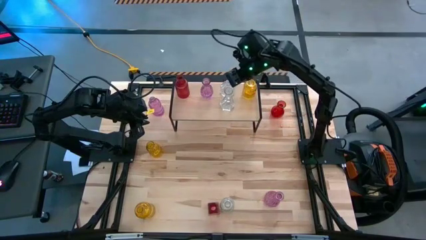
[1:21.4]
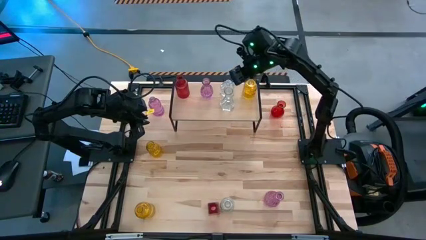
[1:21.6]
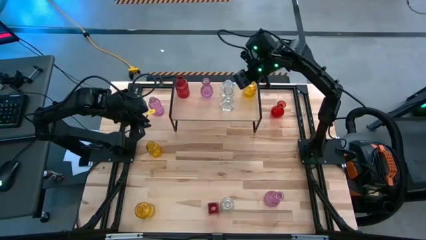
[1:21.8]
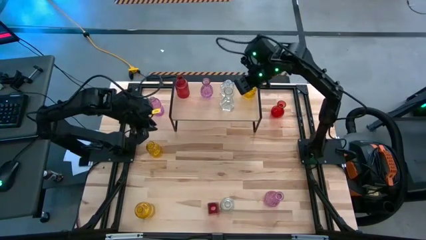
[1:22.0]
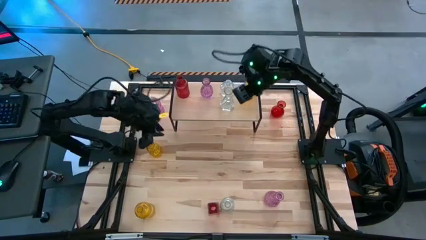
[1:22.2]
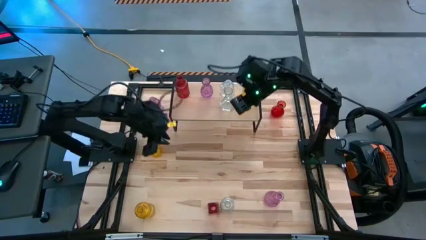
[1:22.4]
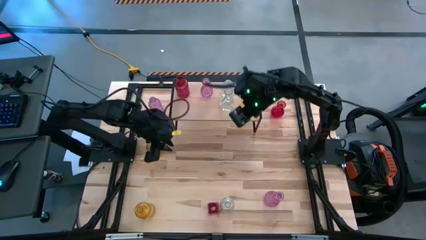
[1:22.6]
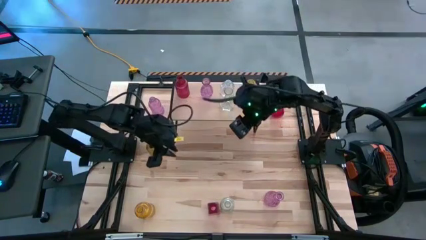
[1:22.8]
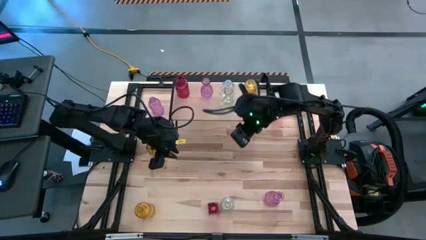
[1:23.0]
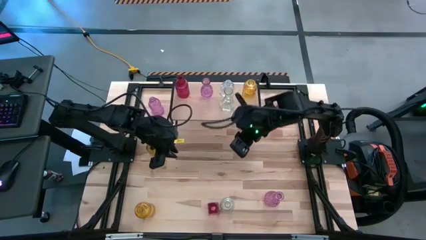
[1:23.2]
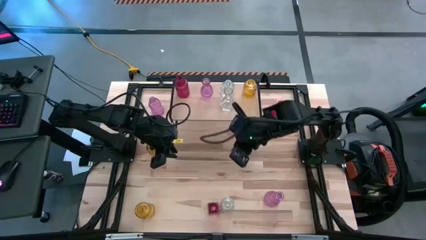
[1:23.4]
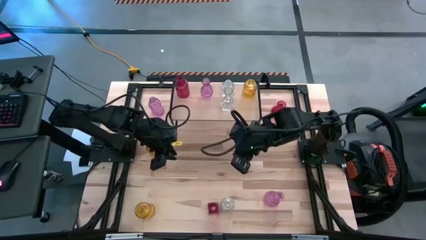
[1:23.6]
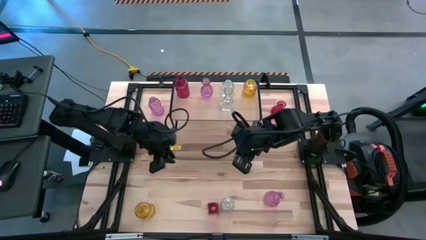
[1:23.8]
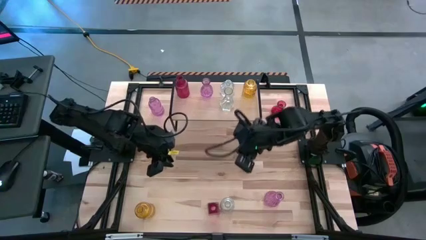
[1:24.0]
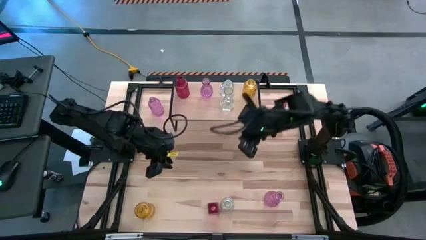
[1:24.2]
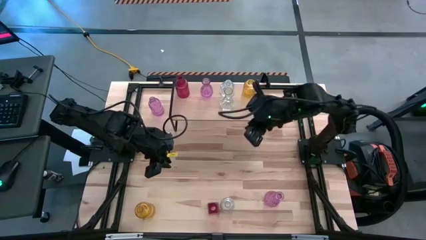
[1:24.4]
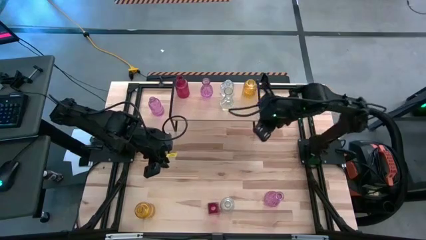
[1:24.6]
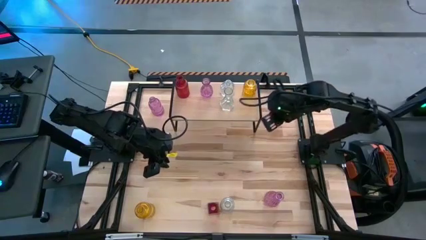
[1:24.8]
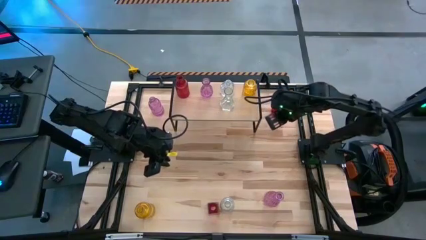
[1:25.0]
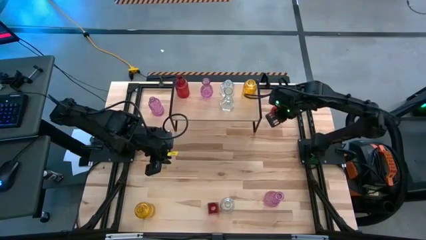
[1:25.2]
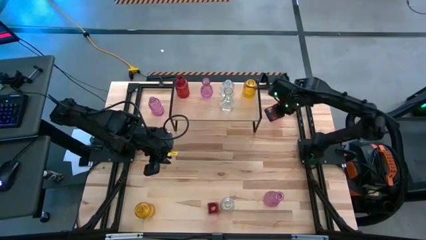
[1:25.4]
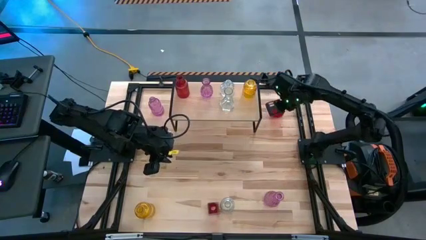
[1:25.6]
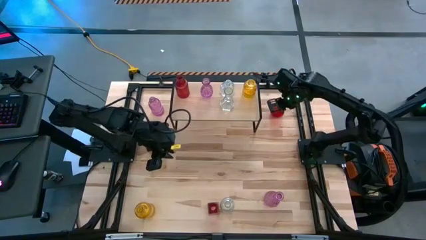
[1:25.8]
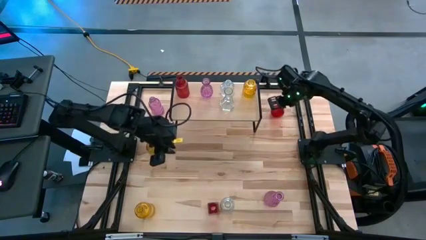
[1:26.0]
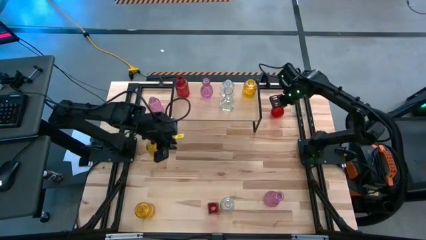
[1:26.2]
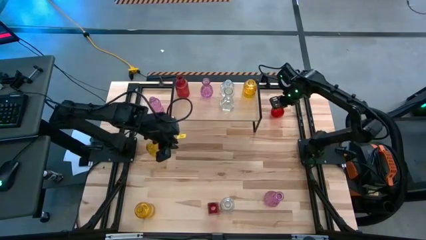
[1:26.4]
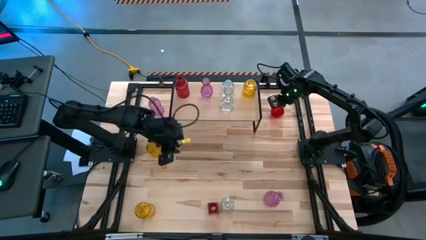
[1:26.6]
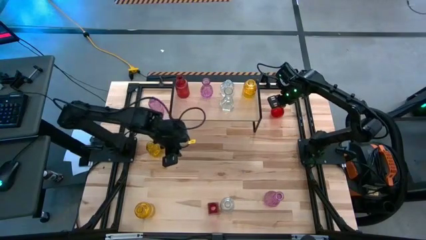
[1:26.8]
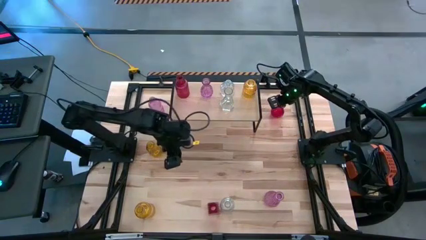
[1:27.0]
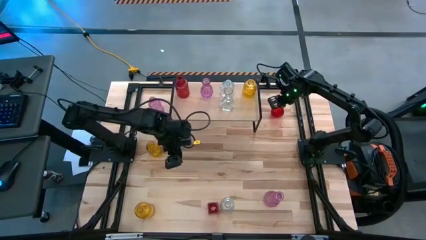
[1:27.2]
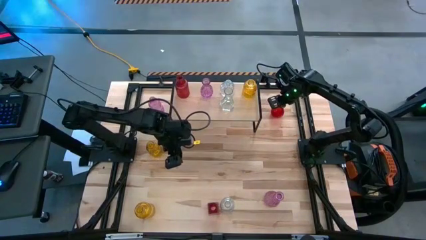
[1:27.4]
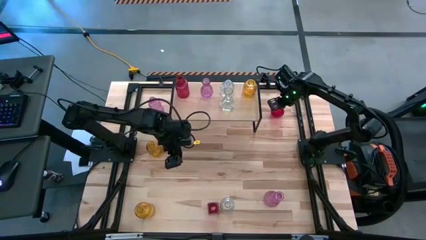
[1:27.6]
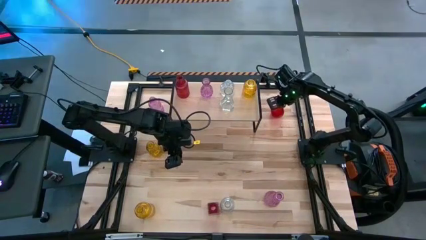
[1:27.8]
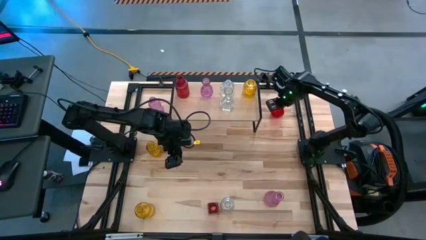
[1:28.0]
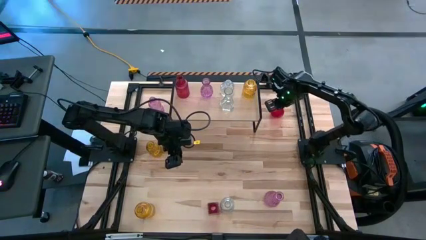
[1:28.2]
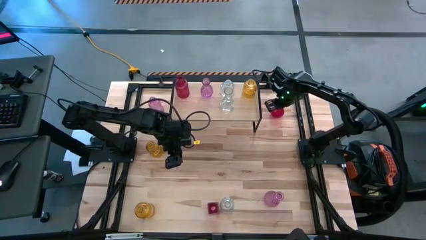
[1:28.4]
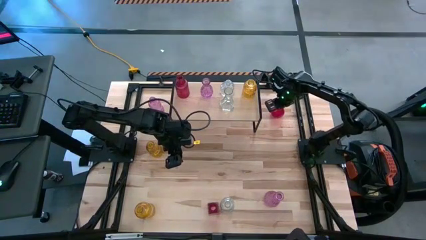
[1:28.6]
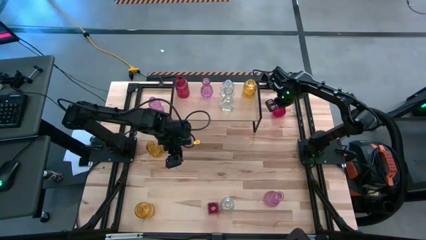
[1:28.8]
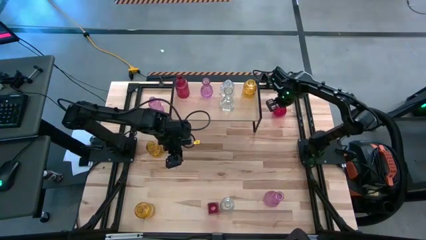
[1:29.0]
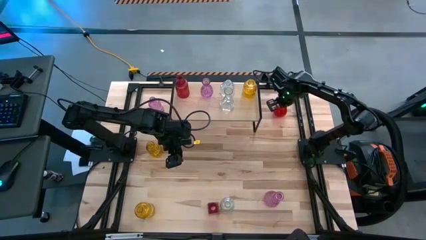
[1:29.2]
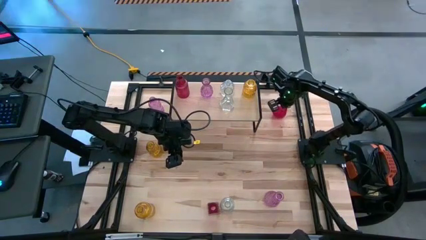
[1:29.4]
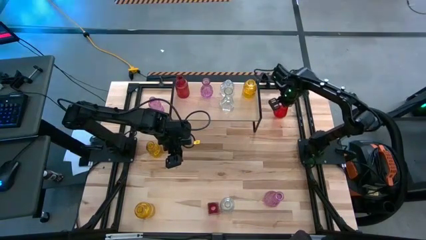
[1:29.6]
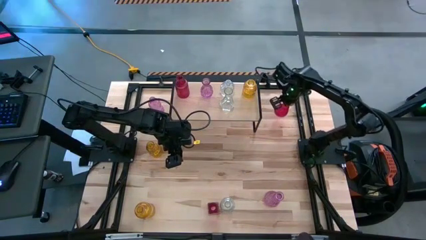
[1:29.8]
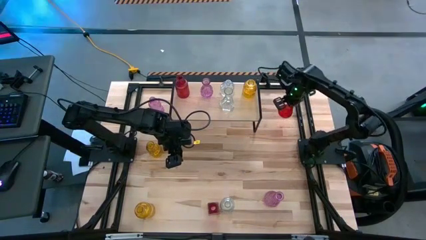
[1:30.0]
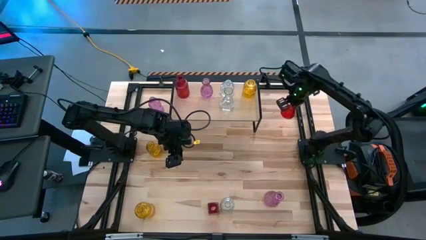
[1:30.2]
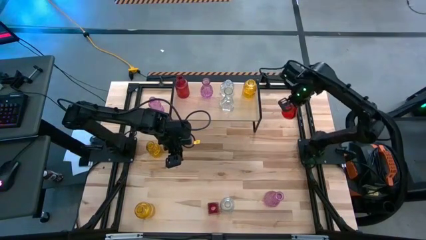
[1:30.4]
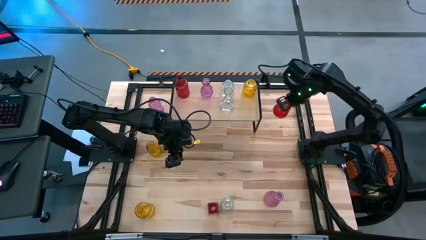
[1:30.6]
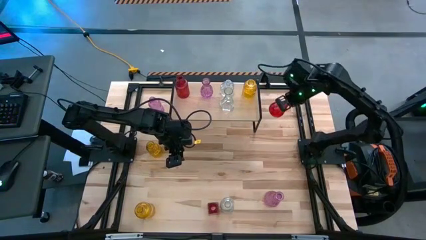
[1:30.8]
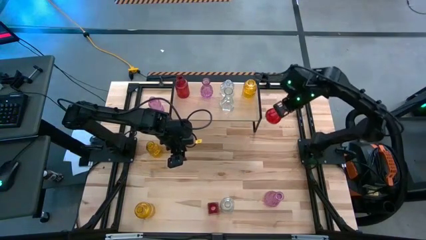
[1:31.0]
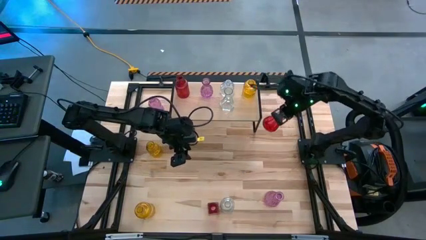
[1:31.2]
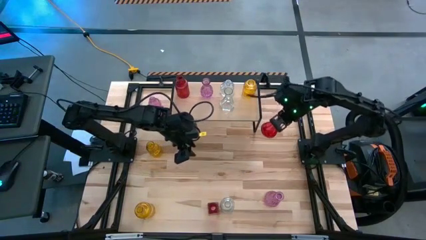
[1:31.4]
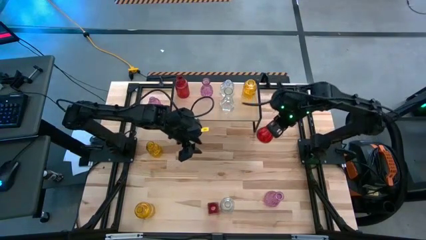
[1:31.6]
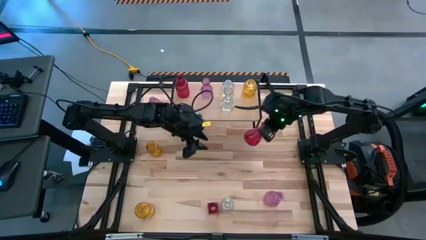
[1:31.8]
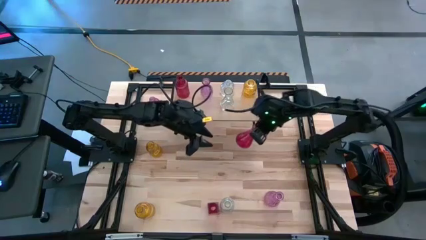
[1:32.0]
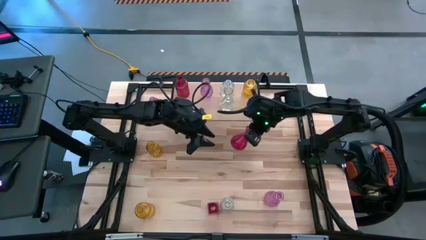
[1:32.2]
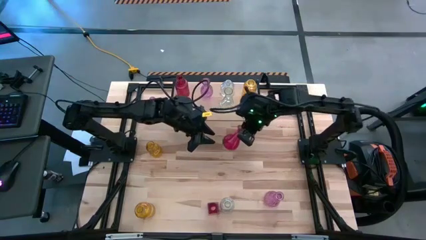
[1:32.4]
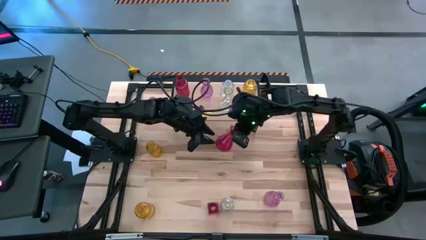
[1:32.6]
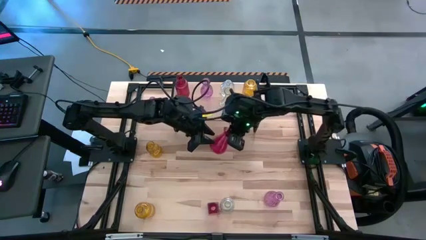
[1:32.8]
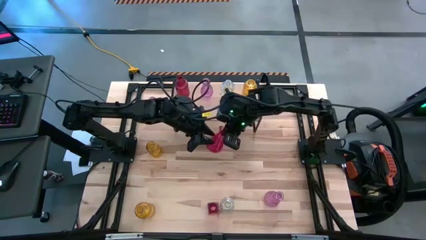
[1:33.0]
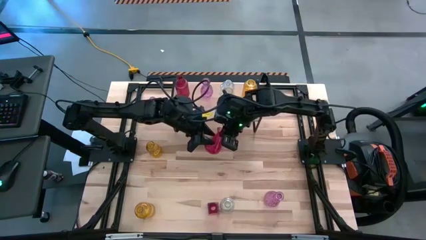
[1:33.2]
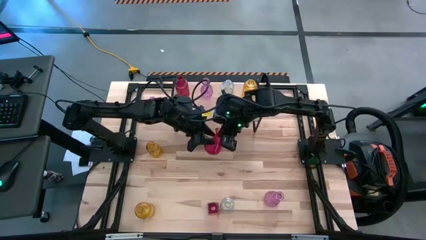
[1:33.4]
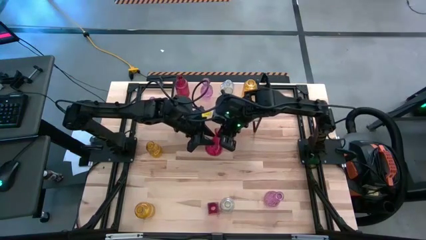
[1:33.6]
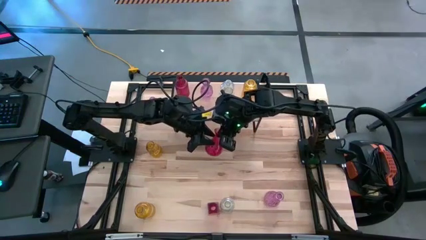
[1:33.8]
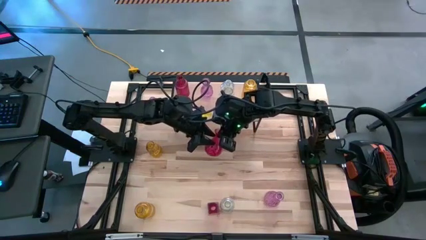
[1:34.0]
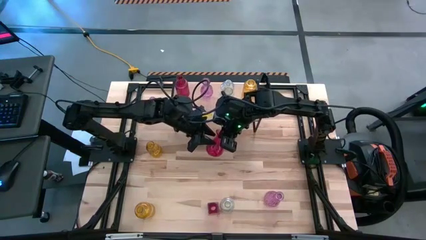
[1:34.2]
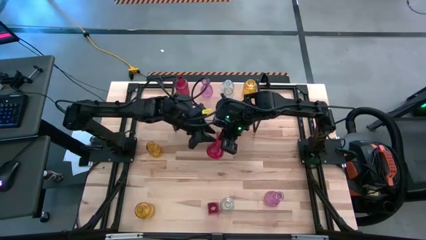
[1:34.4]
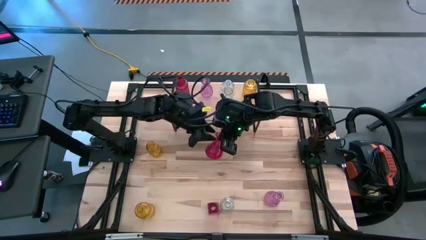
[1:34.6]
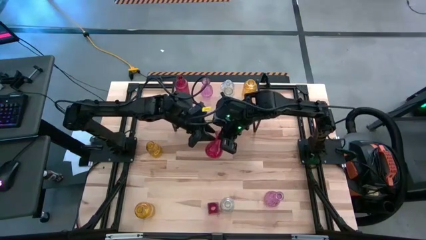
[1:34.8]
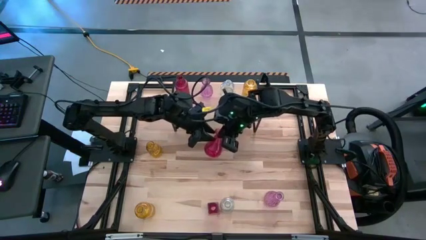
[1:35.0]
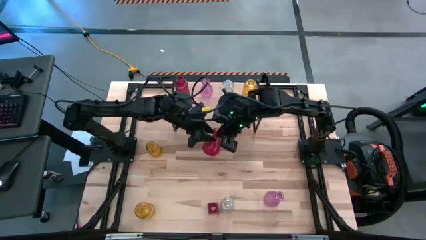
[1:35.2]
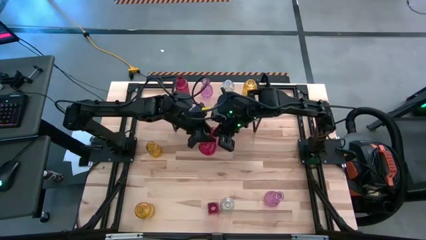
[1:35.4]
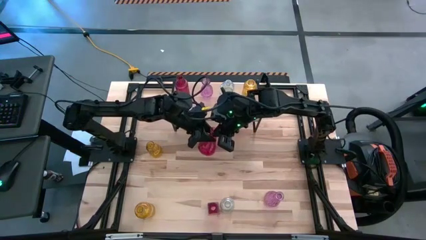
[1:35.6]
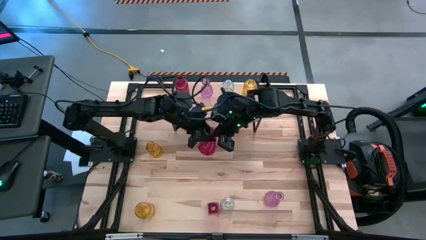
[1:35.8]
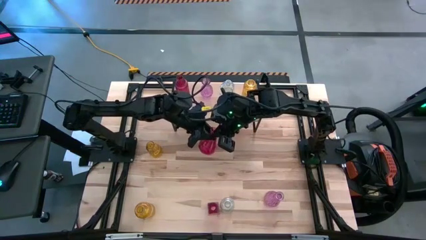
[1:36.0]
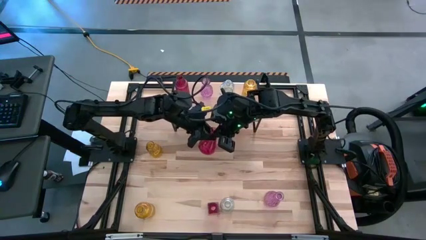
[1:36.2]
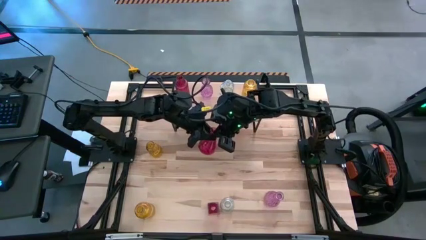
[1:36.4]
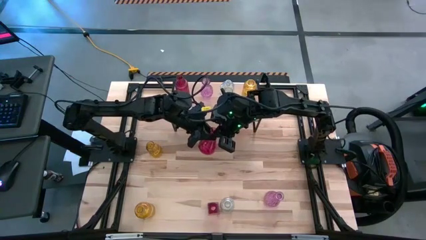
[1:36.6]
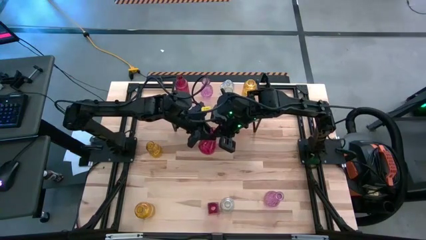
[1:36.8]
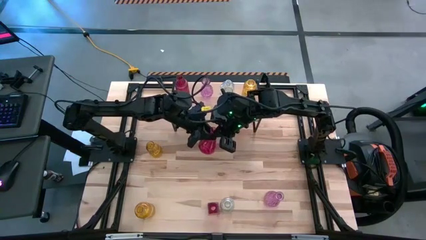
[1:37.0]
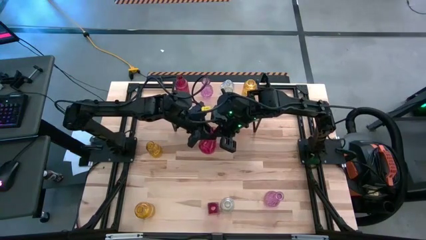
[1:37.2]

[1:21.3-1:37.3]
Task: sort vases onto shelf
Put the right red vase on the shelf aligned with the other red vase
